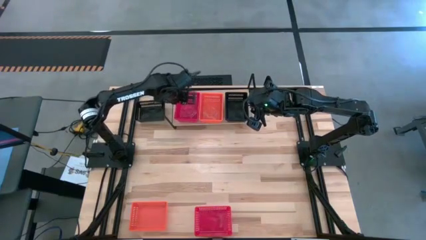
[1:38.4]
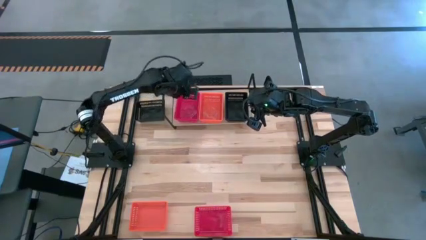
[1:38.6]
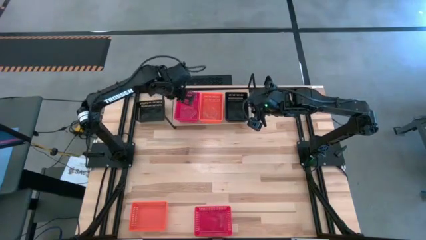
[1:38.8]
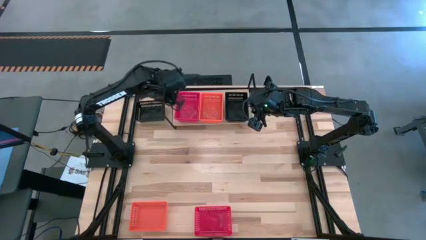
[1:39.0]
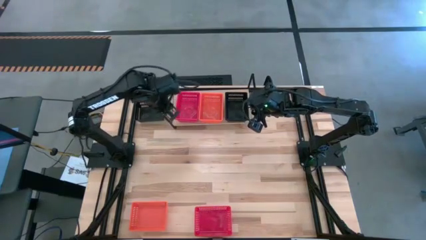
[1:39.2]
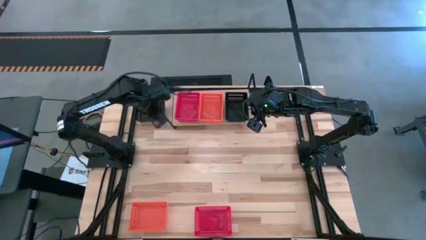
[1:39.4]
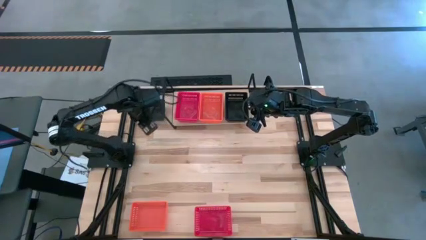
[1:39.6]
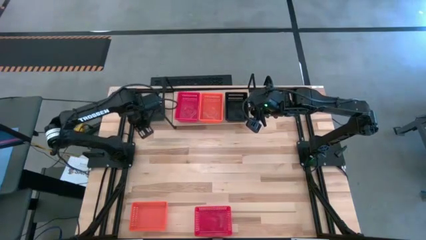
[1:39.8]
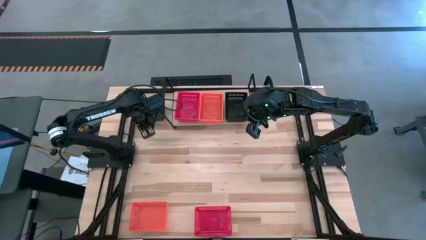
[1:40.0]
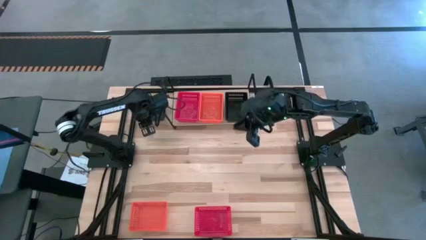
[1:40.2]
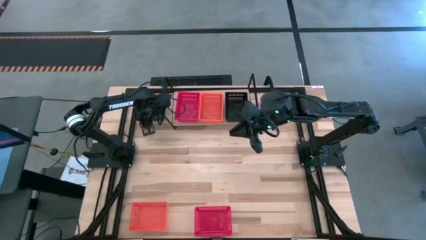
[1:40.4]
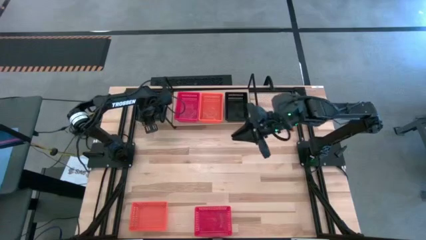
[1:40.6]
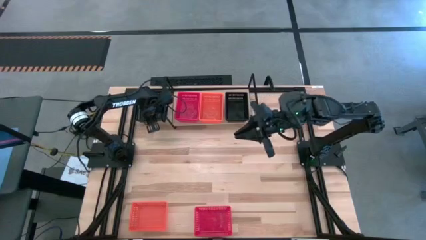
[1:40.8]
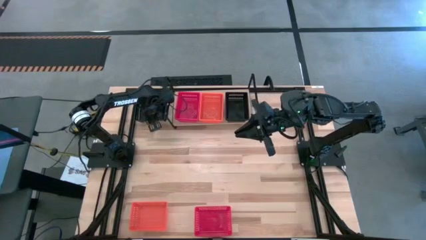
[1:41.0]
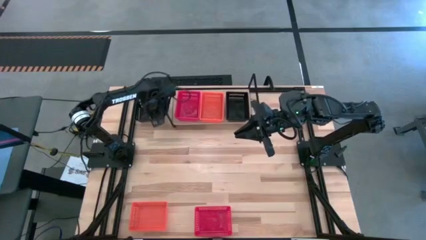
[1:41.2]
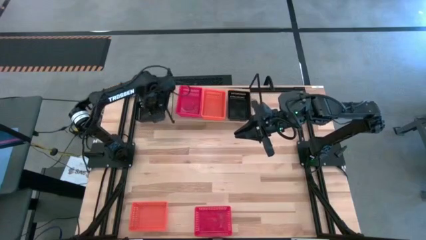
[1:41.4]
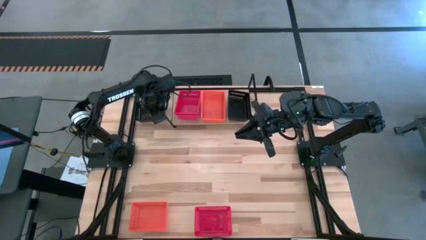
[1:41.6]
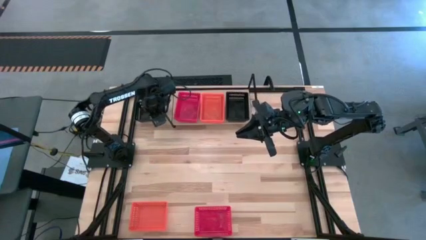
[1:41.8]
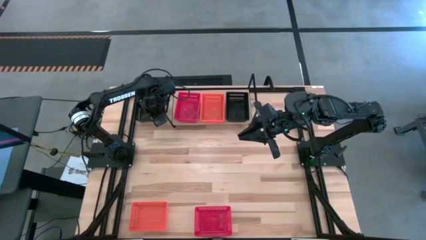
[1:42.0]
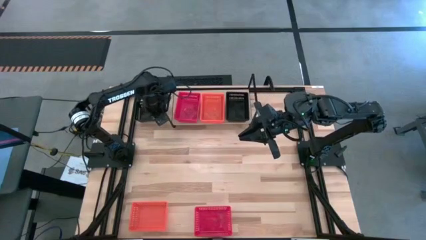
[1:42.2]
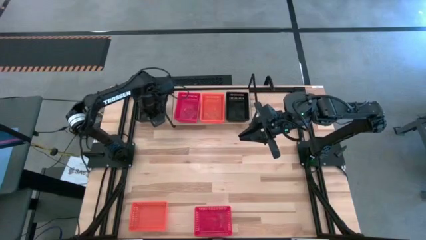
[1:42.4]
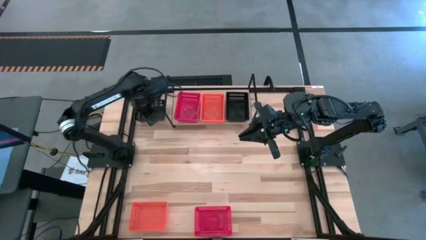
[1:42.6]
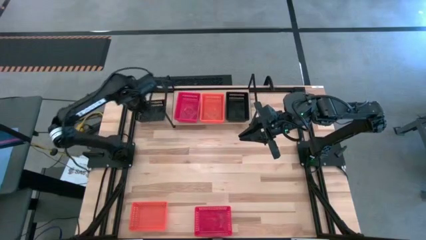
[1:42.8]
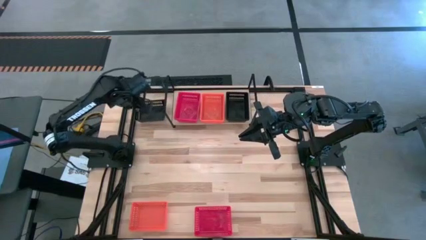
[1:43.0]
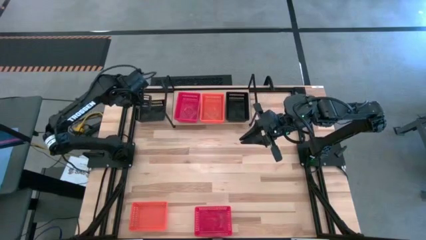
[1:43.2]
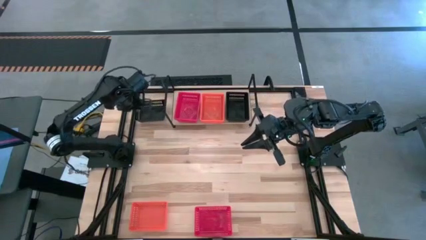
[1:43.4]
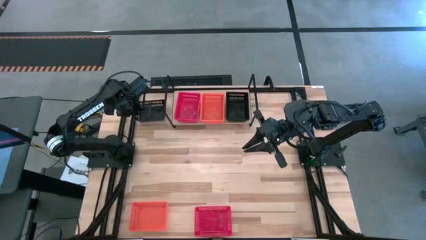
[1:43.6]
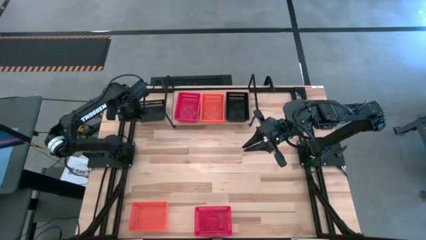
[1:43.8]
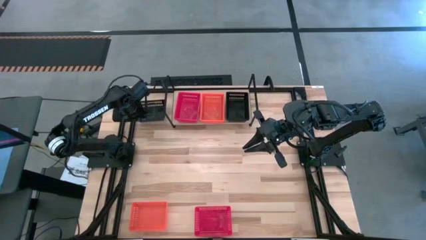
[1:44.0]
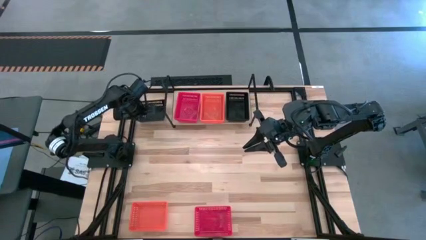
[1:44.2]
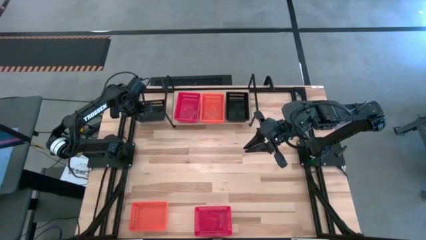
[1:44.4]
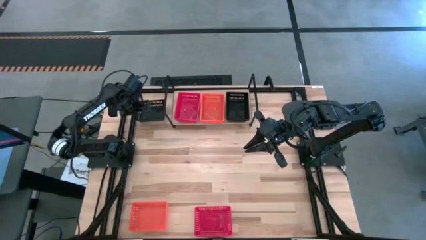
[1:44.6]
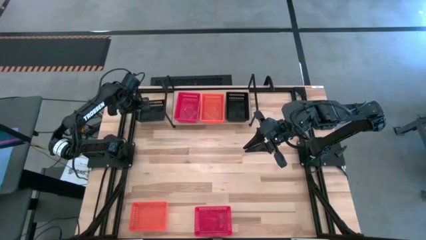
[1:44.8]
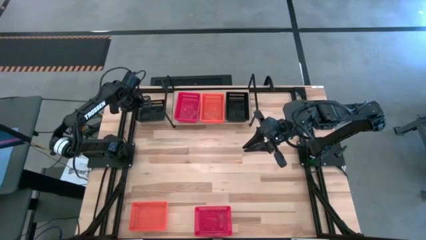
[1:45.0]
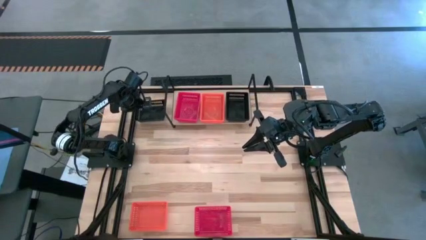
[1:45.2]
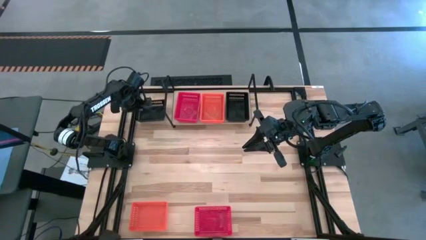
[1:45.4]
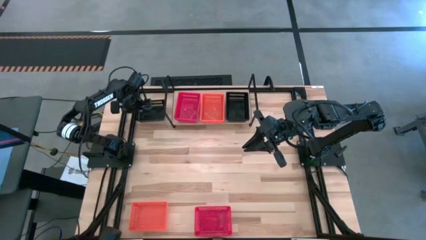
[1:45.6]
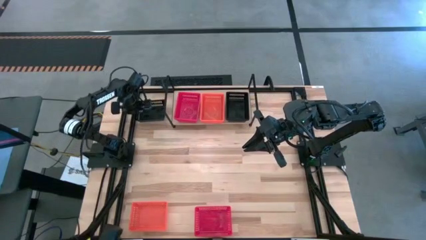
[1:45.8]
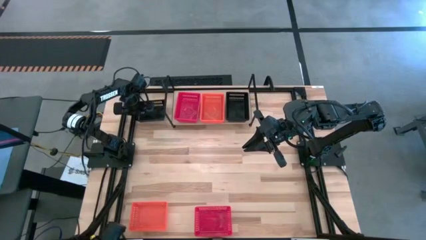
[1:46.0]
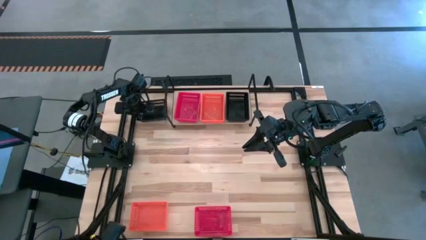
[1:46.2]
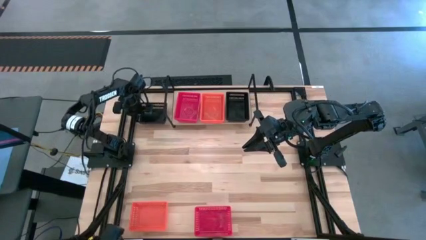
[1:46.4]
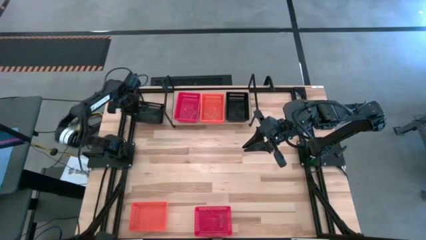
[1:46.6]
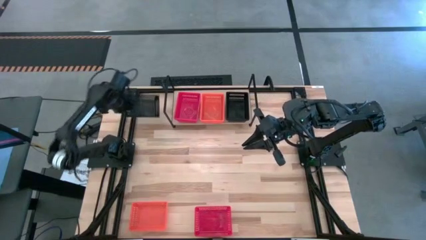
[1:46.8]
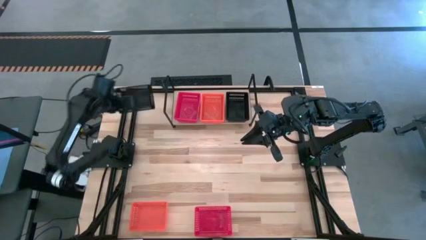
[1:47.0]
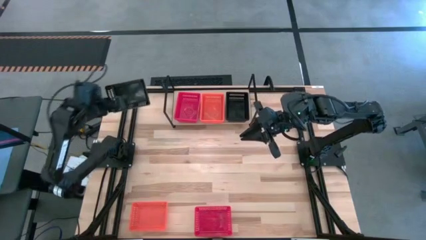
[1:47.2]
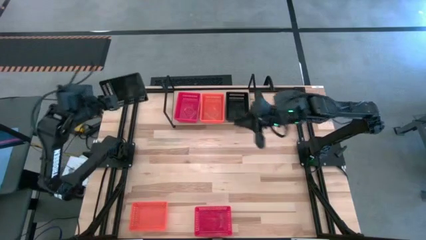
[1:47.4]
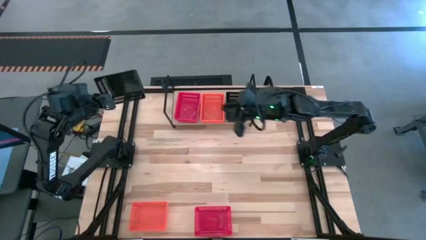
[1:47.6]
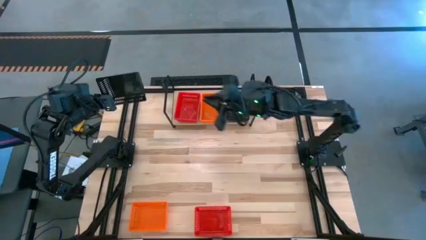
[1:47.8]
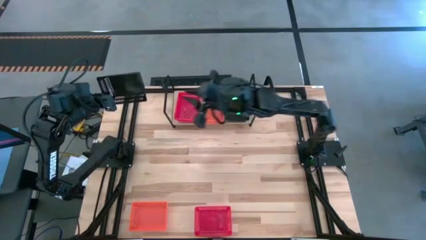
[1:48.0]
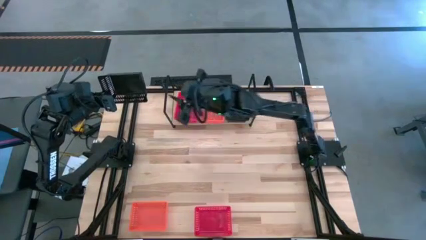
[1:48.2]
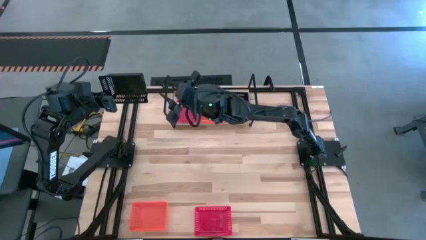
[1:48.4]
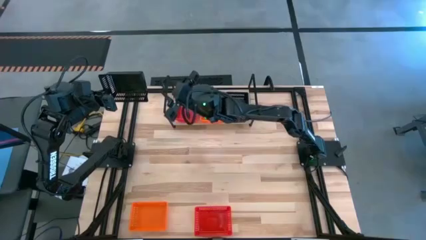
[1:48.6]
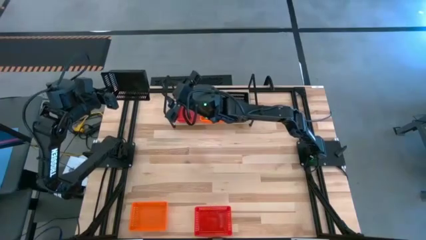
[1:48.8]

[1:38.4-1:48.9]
Task: Stack baskets on shelf by color
Stack the black bin on top of the black bin on the shelf

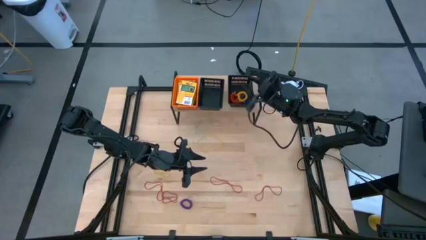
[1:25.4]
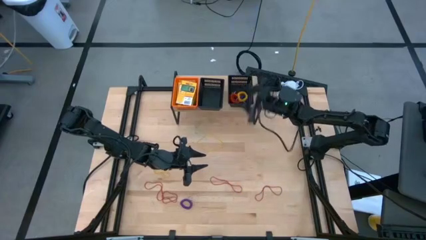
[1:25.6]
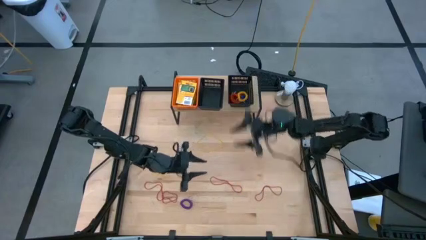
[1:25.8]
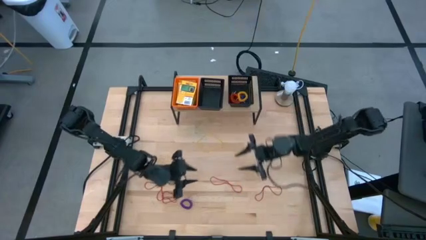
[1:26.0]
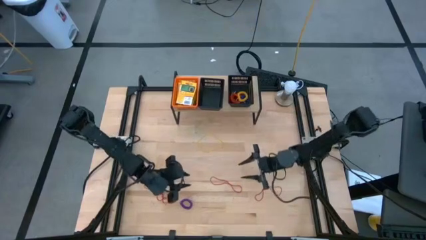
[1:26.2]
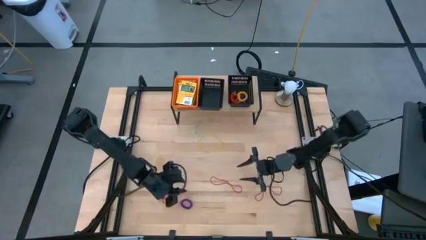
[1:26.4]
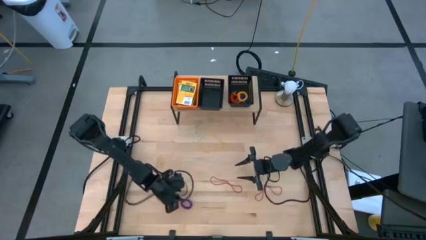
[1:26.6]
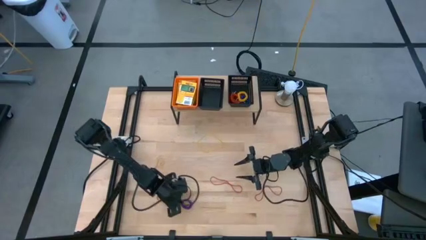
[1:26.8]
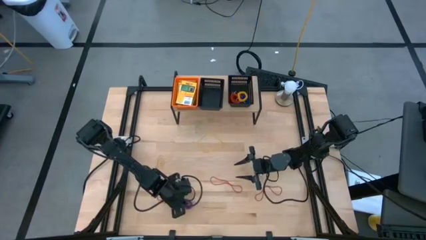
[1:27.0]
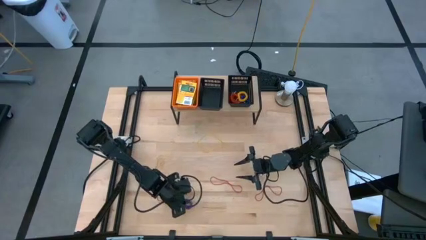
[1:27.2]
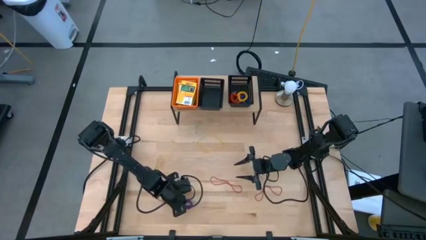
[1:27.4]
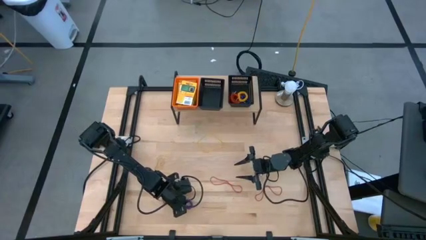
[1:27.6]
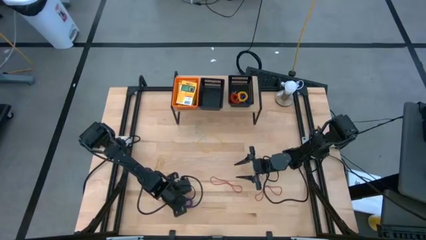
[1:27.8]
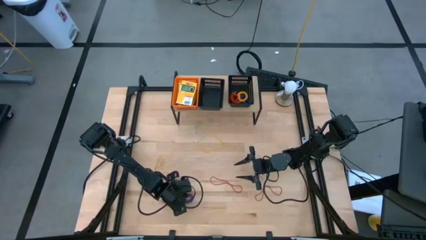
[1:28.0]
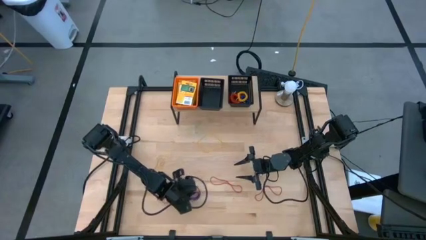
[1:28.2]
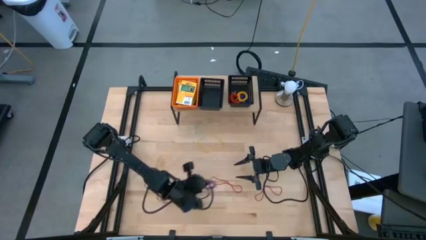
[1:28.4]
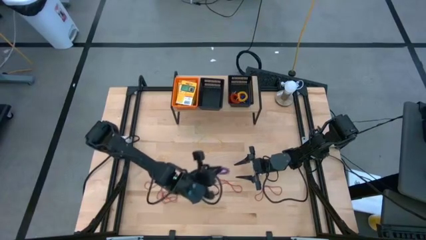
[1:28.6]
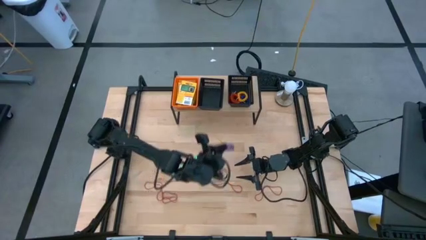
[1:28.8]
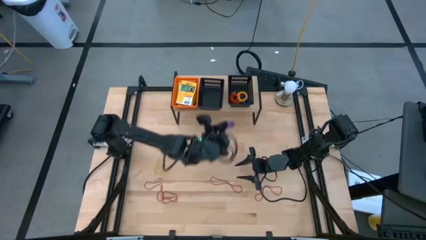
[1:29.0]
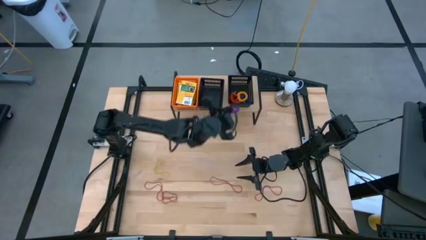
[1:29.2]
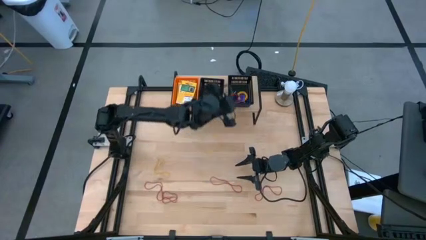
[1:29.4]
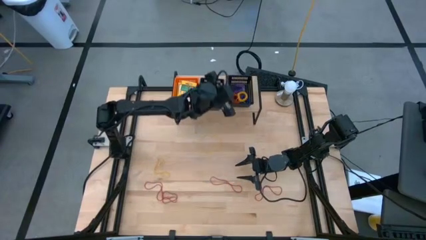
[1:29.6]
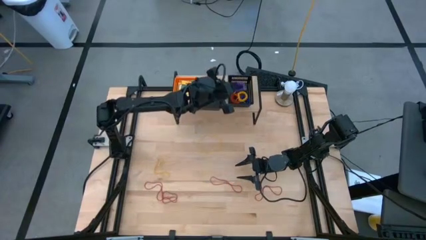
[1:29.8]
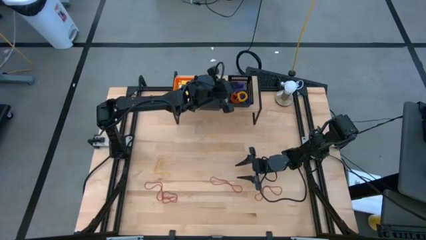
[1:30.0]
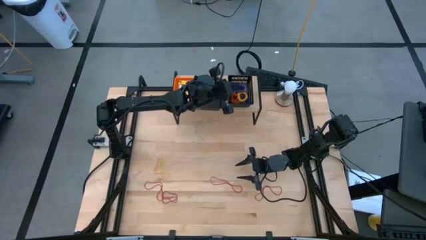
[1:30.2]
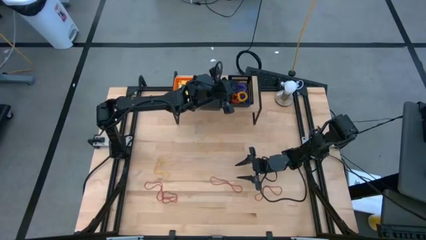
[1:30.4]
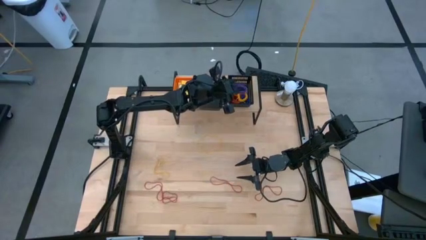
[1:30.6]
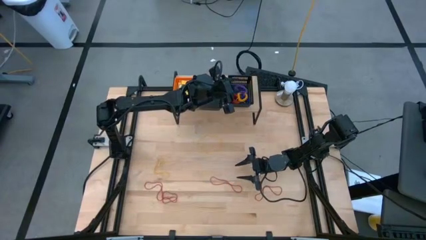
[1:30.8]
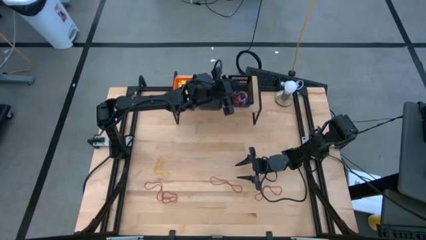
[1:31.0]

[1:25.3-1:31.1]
Task: Pick & Place Office Desk Supplies
Put the violet spring keychain into the right black bin on the shelf
